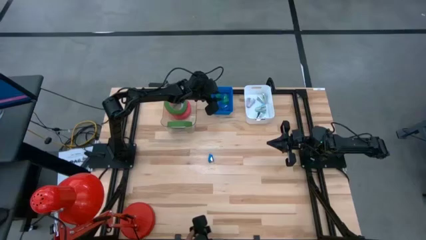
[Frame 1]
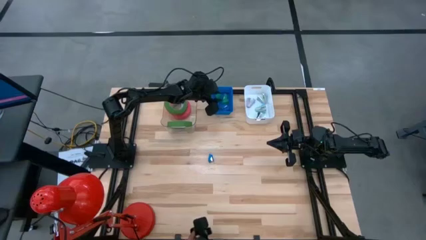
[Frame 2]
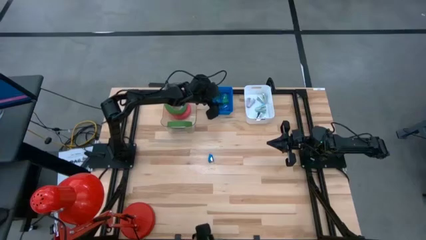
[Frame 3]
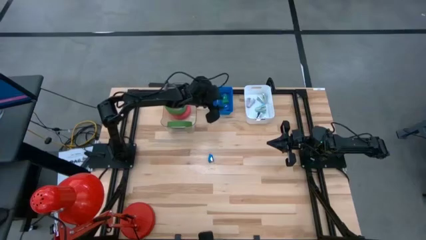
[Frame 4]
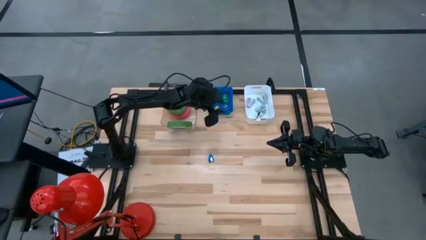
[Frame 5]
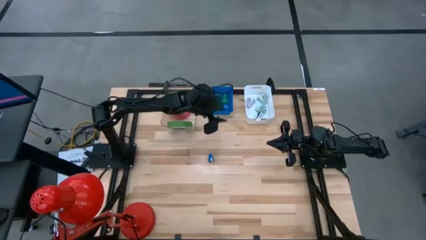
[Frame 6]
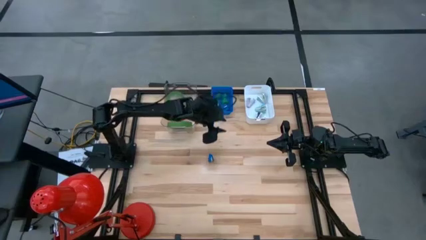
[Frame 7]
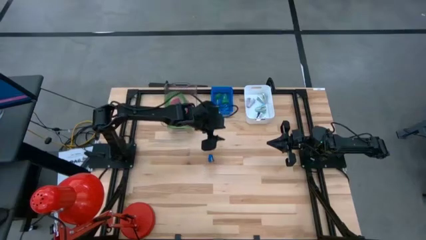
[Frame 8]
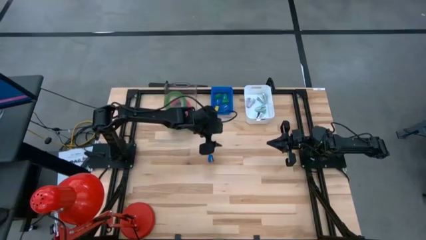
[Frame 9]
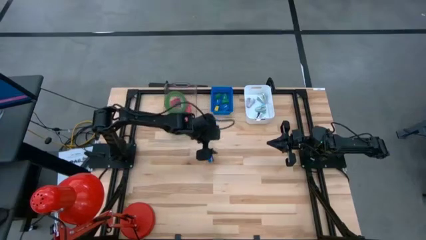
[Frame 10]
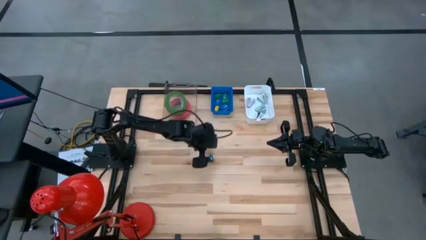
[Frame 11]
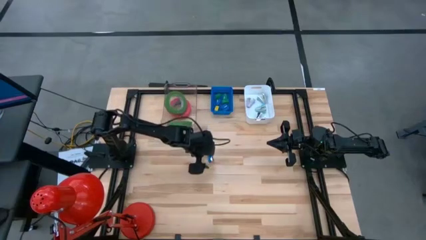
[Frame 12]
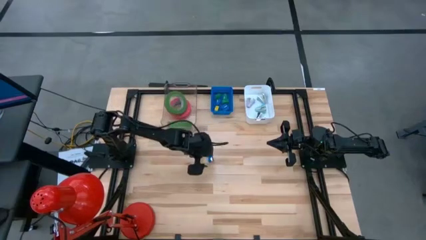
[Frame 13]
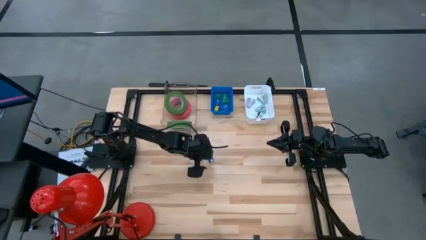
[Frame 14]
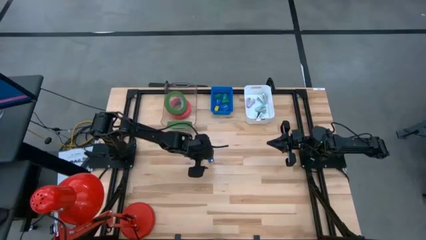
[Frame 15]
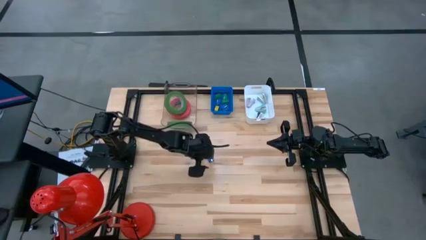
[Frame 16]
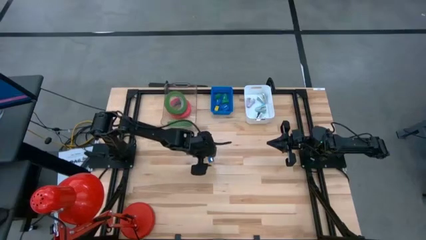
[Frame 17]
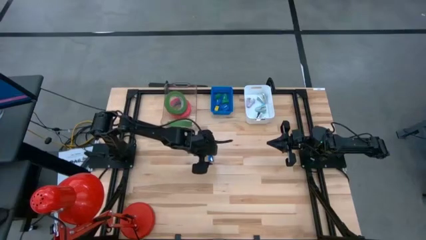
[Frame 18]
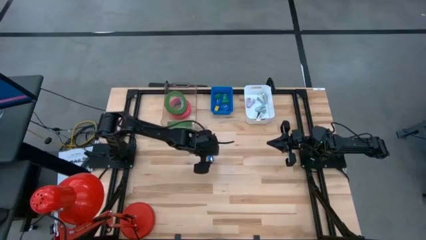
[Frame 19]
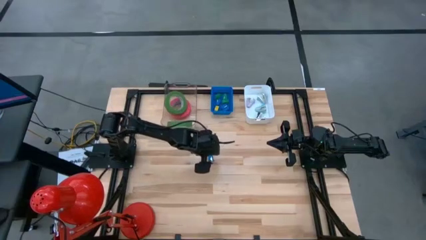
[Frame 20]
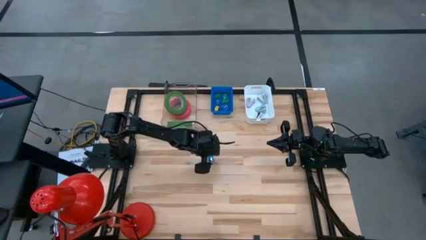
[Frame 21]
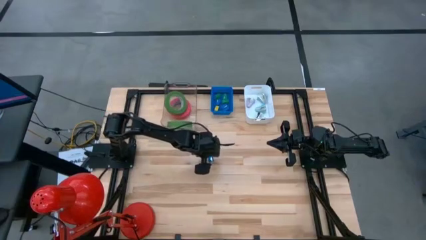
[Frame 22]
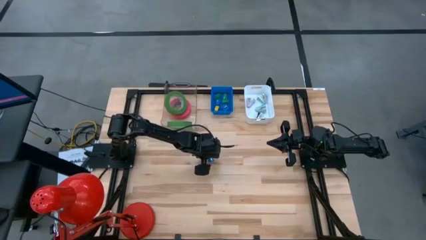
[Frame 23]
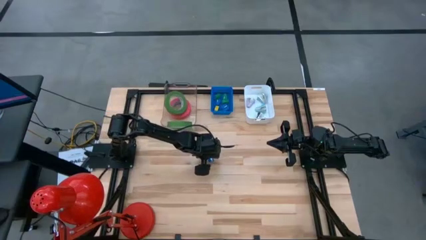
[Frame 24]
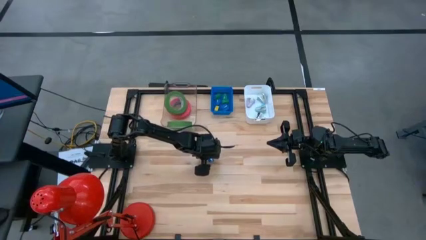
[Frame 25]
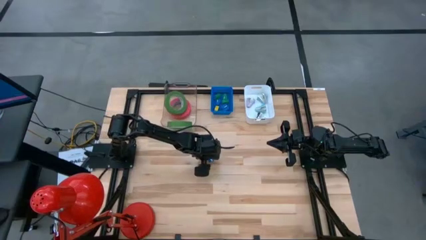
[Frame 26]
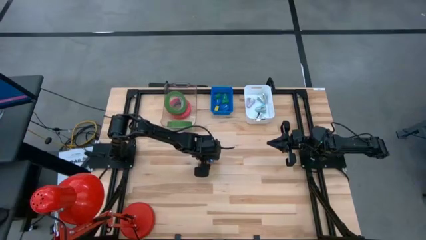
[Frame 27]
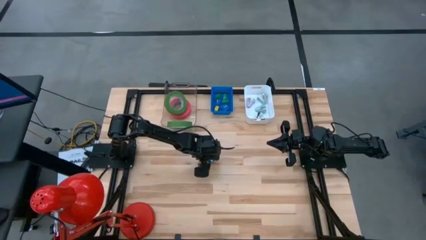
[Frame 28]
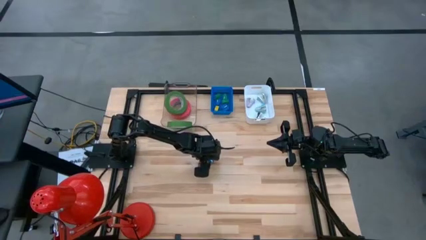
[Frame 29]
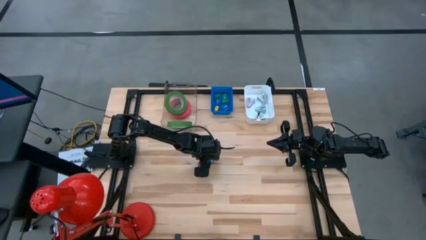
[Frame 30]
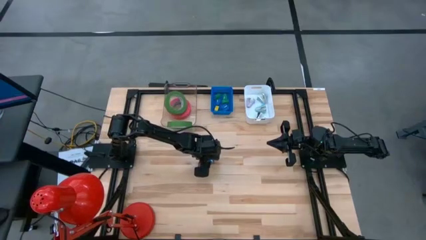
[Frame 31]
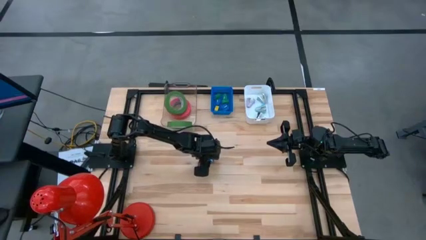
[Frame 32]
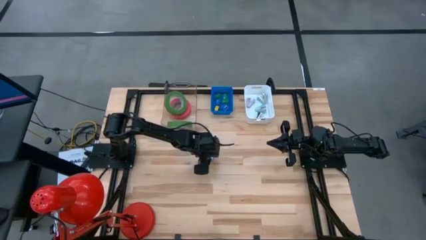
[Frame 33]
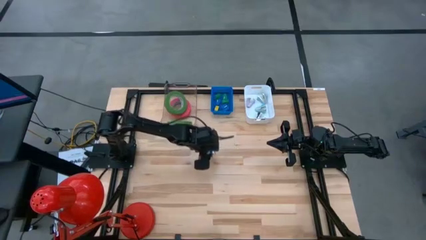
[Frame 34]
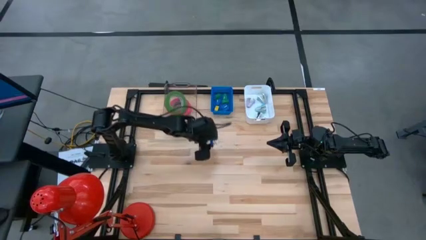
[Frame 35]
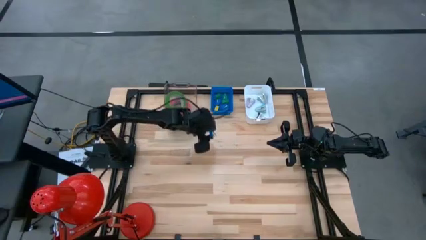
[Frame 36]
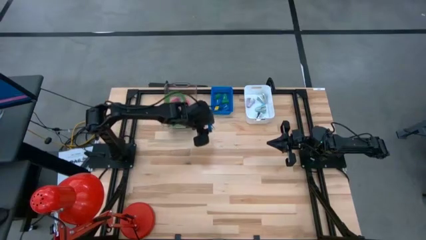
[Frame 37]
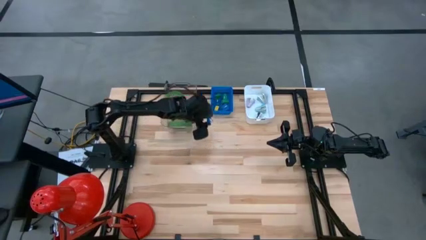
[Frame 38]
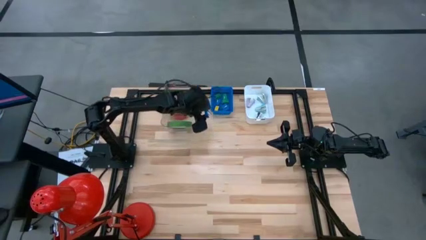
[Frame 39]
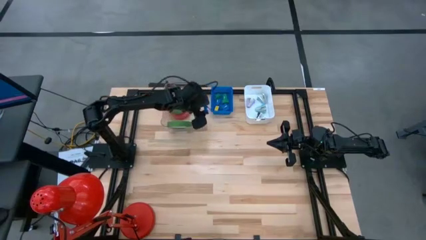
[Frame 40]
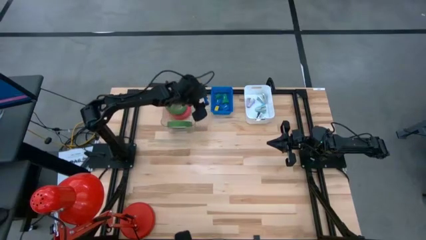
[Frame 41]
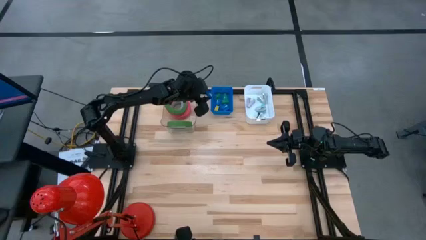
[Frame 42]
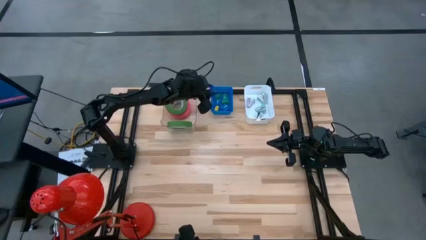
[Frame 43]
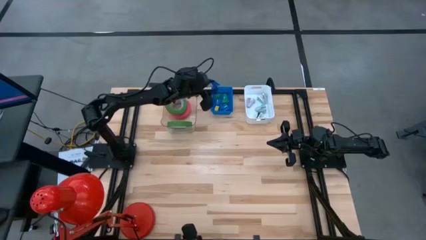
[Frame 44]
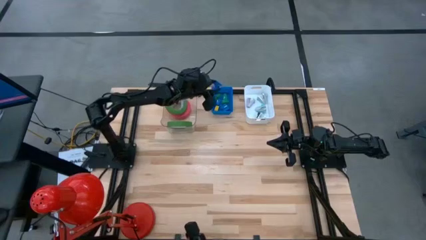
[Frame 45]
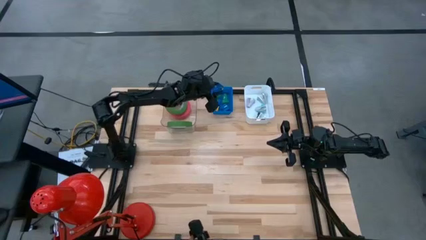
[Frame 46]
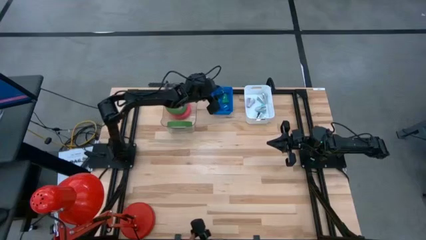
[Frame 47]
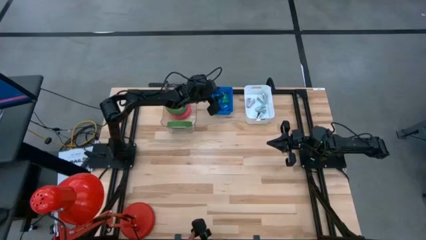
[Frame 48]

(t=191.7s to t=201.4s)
Task: Pick and place Stapler, Stapler remover, tape
Put the blue stapler into the blue bin
